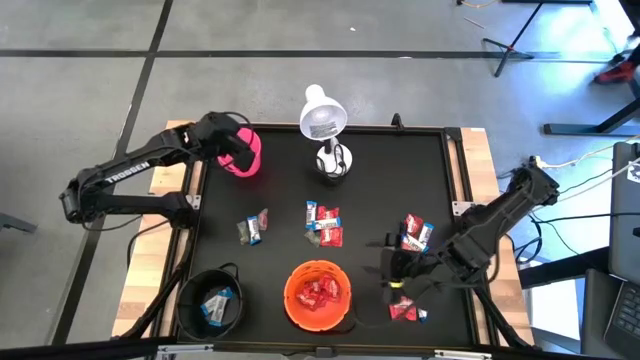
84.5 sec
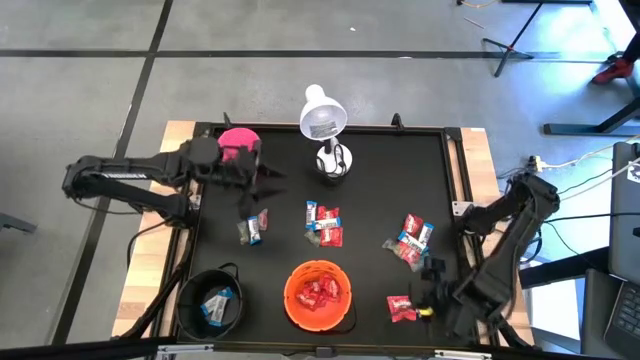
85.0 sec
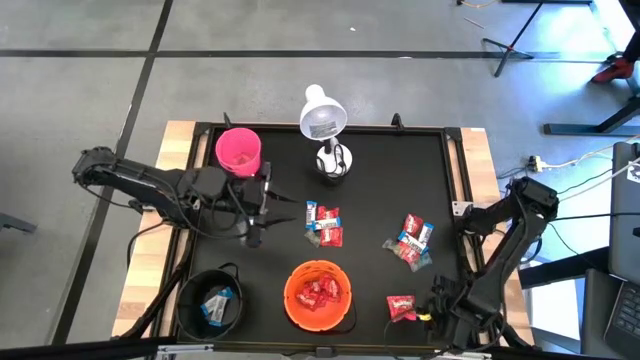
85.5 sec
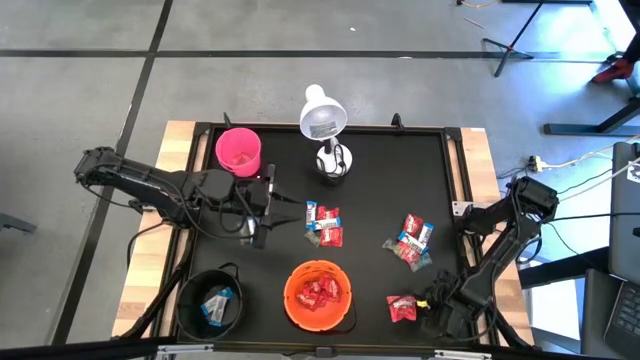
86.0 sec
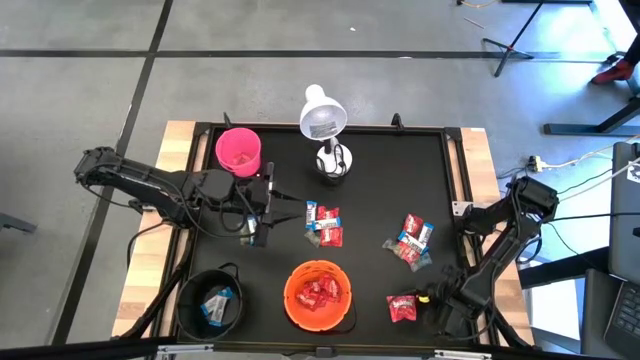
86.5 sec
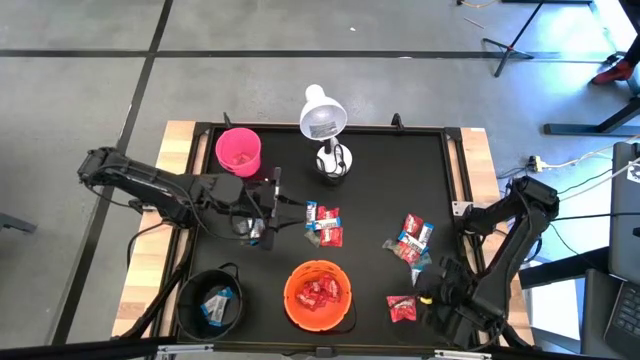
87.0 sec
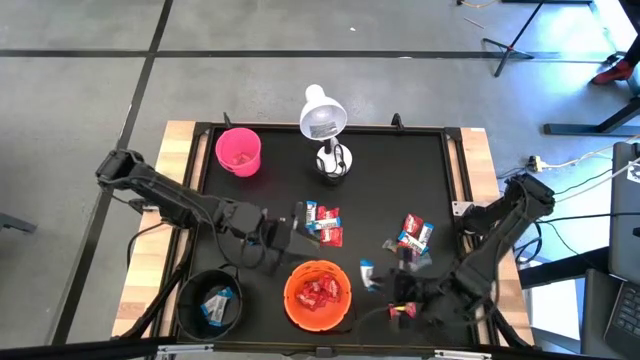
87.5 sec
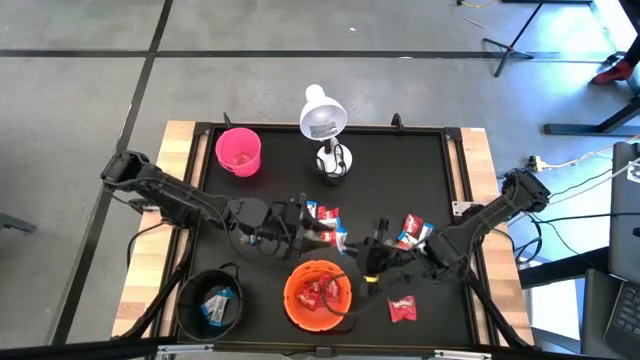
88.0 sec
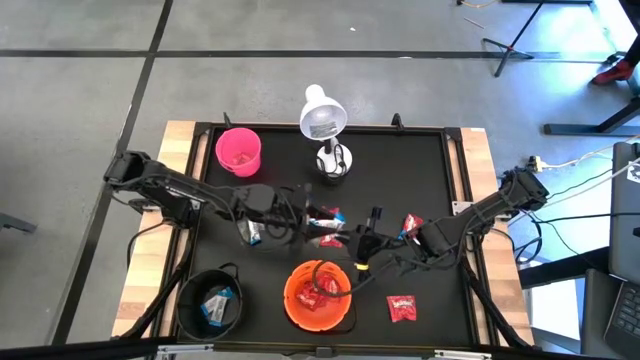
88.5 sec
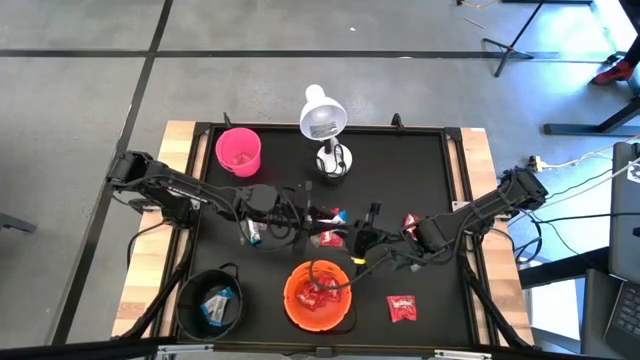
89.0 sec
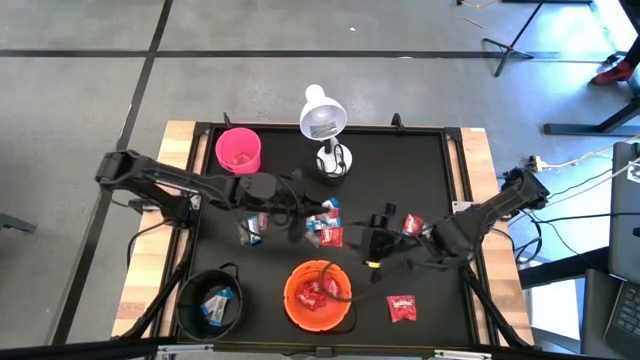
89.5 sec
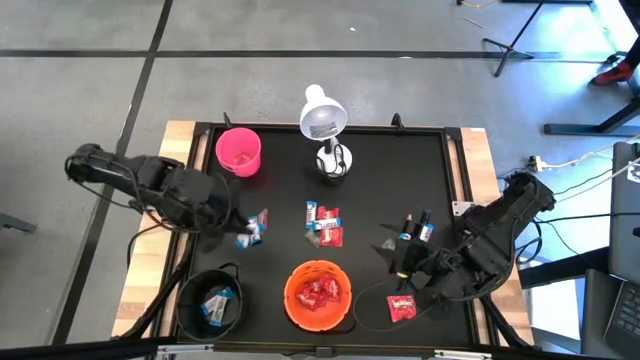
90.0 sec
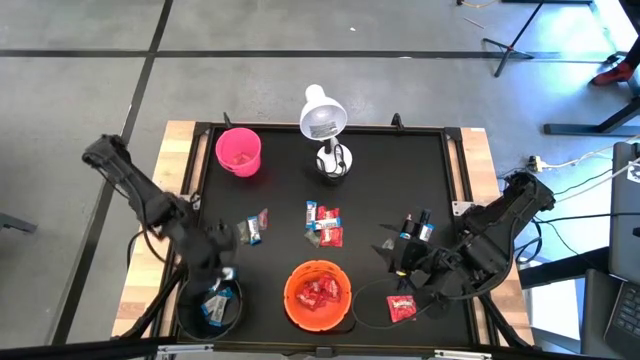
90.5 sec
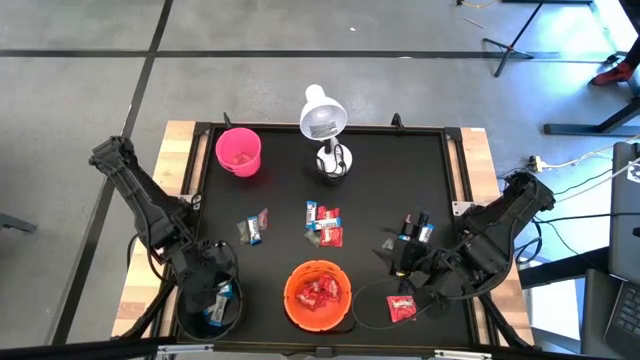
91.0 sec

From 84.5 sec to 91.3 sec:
Task: Sort candy
Put the white candy into the black bucket

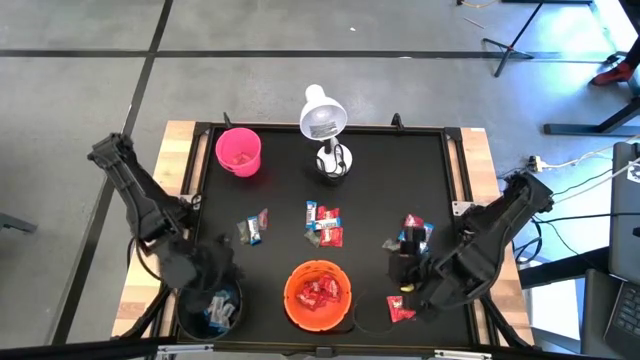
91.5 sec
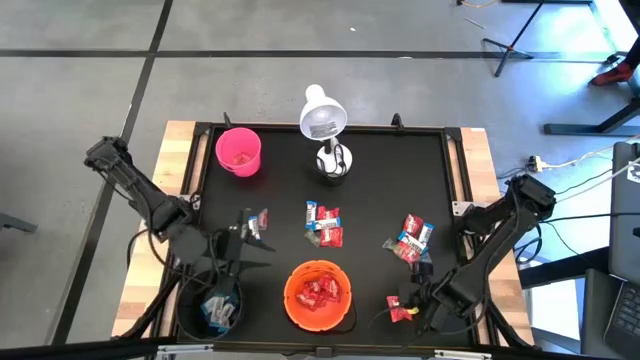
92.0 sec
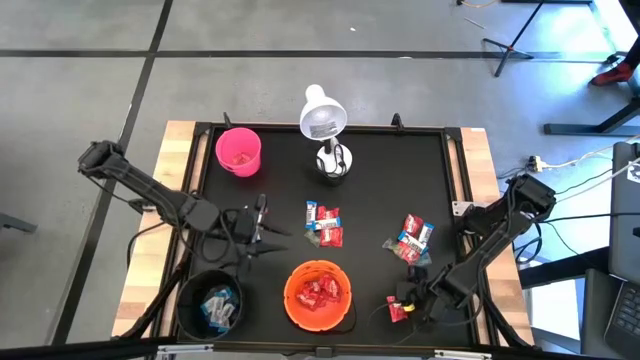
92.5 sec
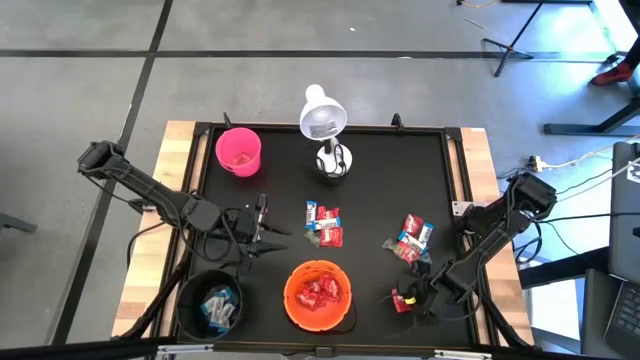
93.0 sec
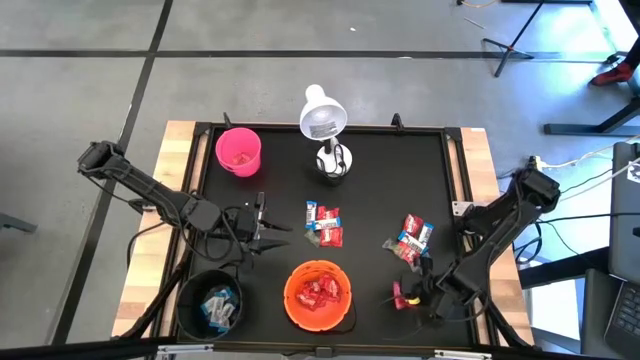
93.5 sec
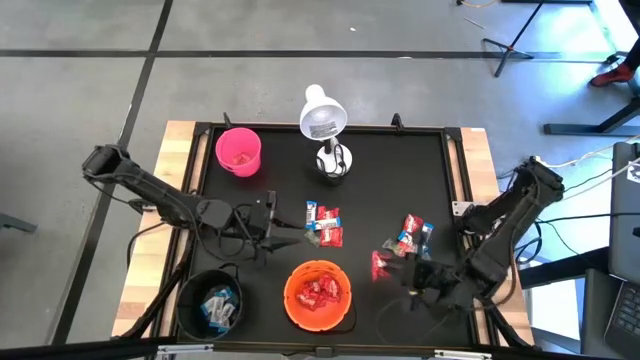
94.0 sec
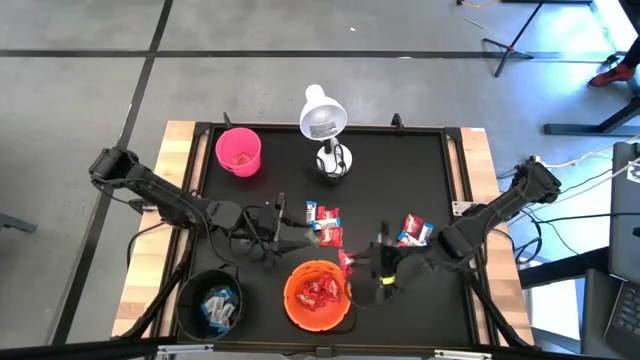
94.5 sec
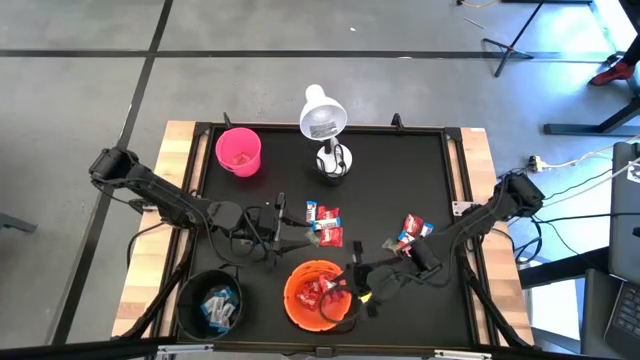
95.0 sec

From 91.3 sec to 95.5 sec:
Put the red candy into the orange bucket

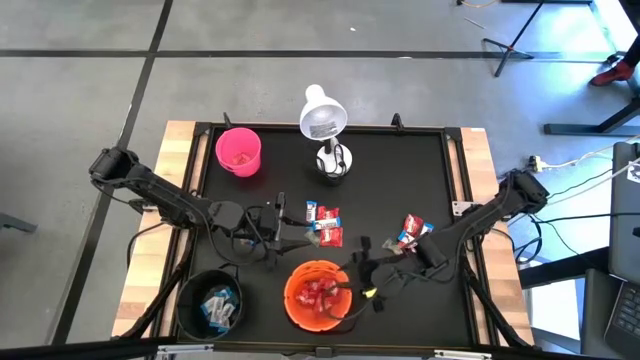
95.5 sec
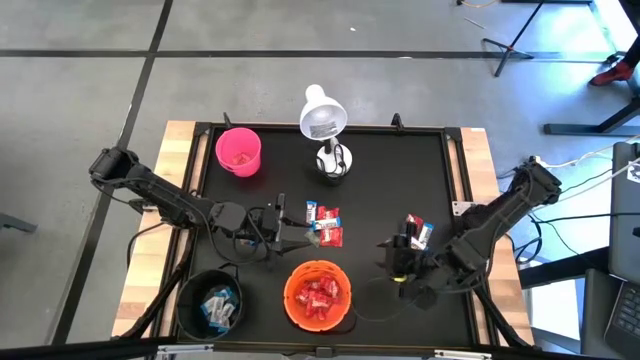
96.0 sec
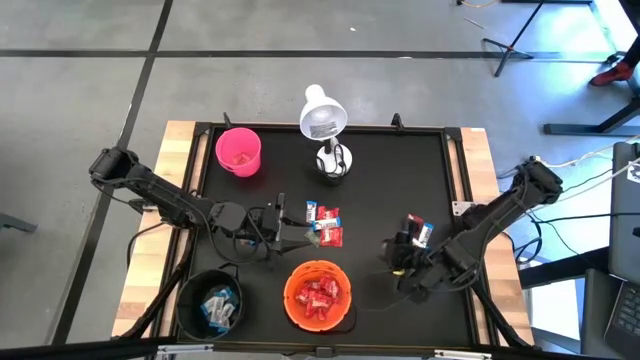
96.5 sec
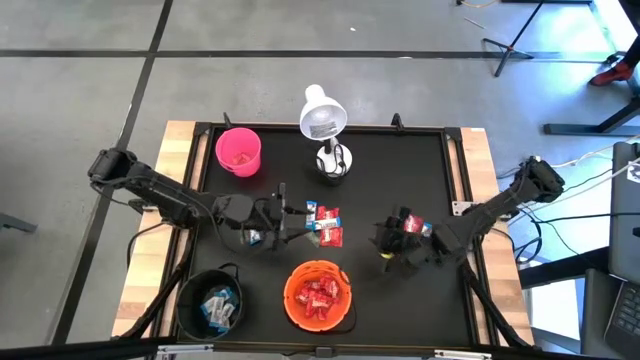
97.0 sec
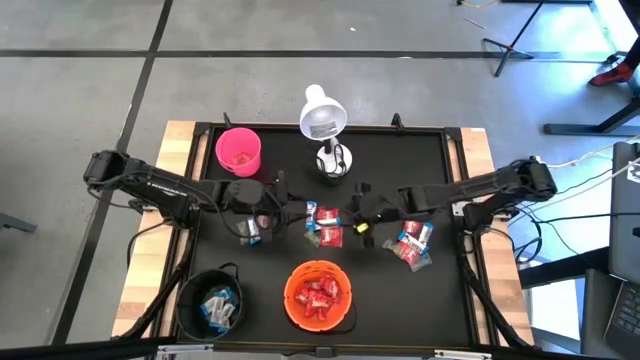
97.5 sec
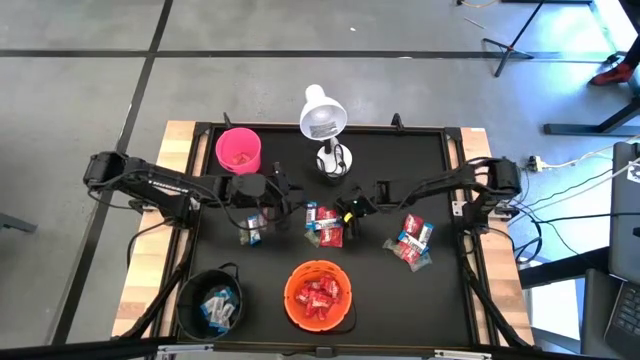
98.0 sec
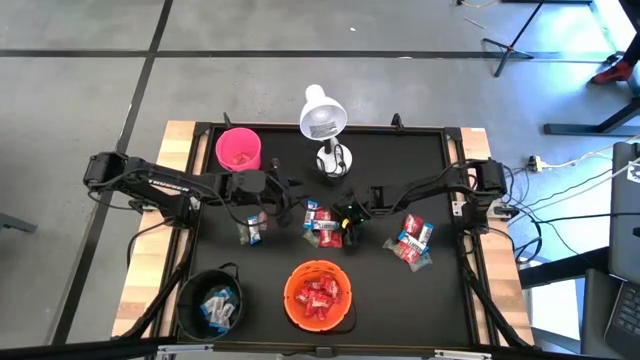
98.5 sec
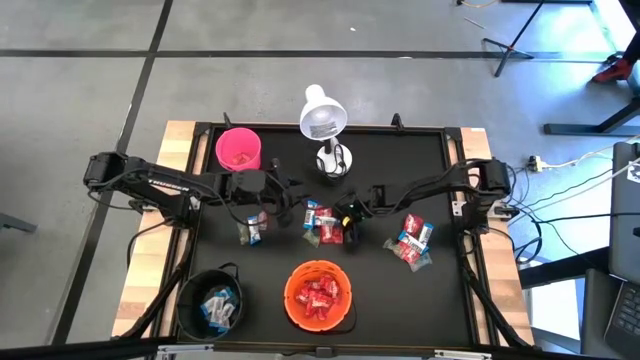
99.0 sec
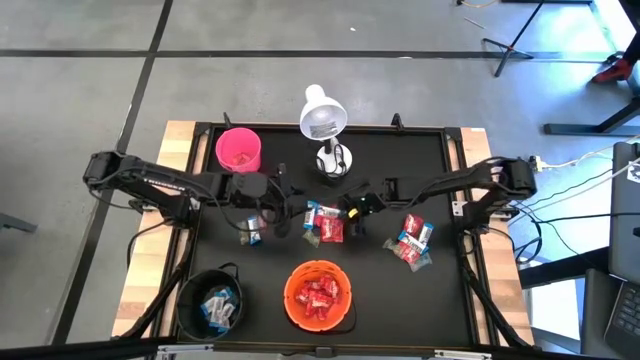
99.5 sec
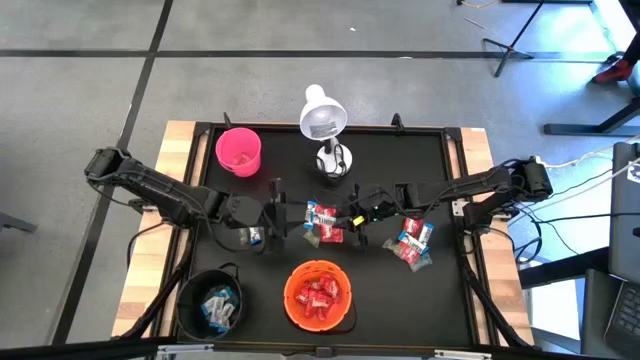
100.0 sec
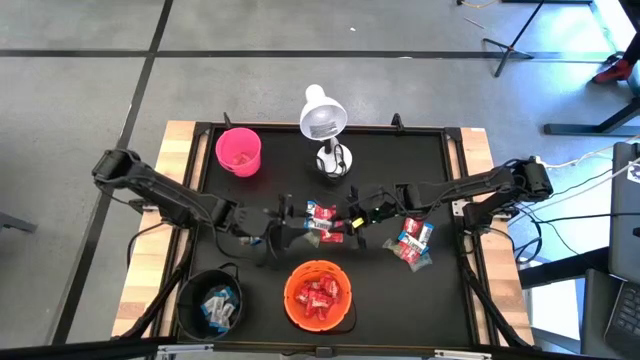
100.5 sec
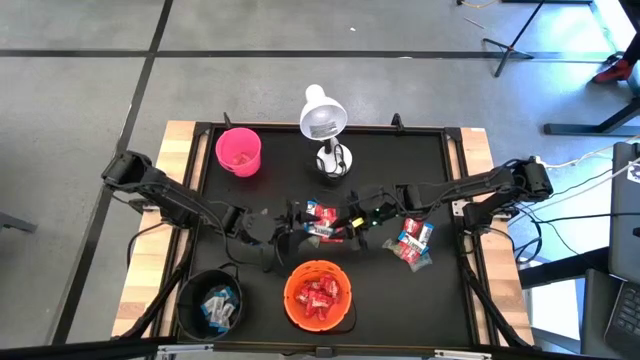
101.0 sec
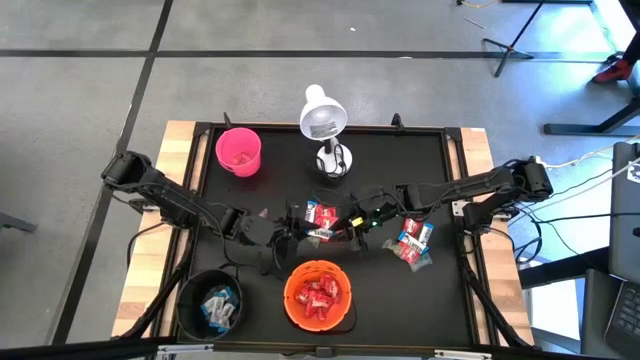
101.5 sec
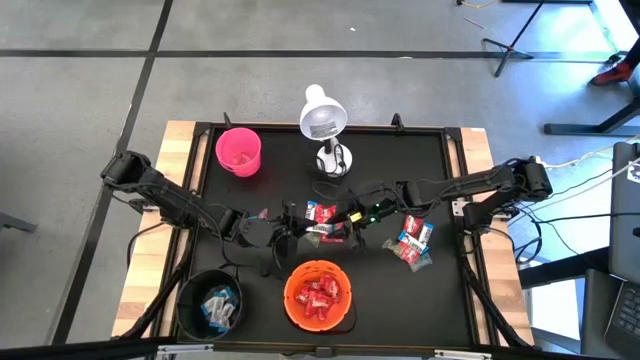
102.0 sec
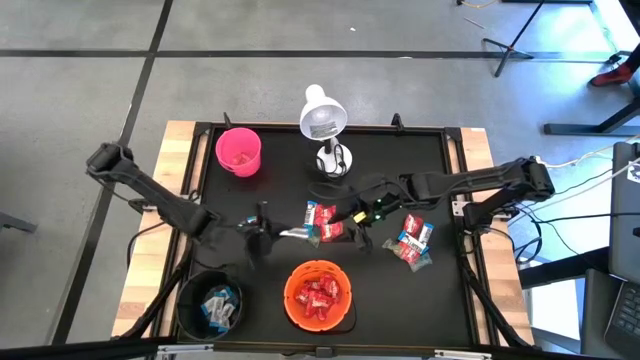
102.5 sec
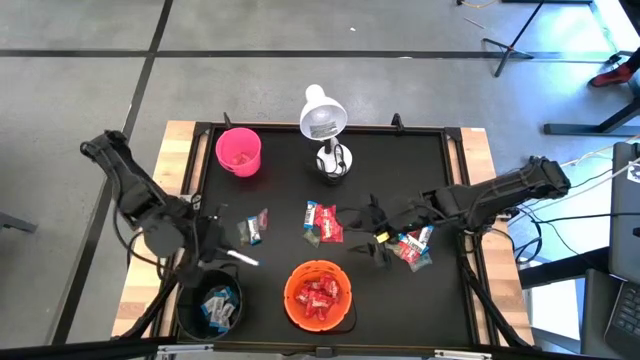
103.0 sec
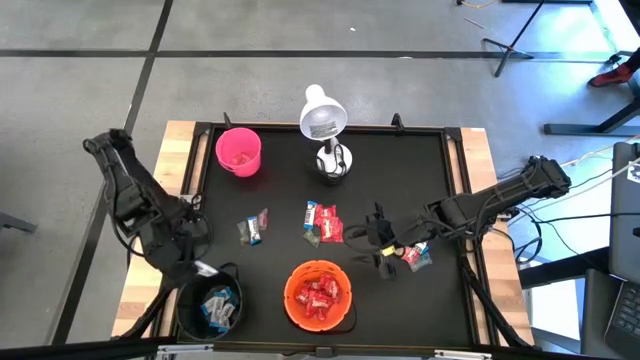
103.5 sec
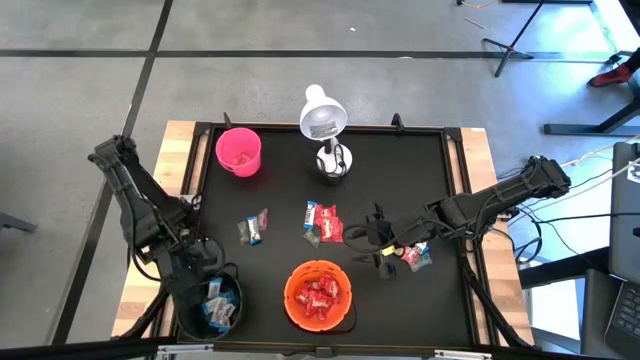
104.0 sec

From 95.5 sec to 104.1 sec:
Put the white candy into the black bucket
